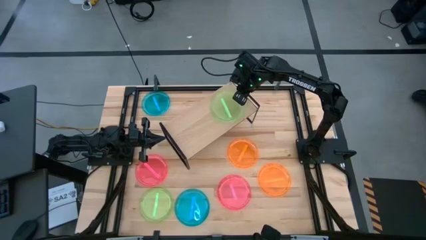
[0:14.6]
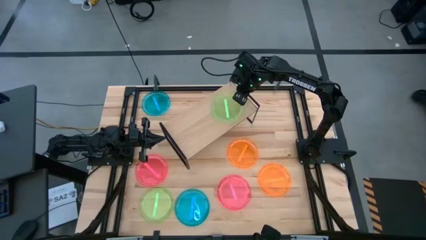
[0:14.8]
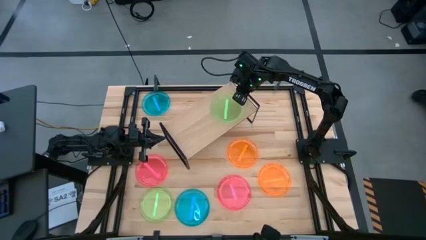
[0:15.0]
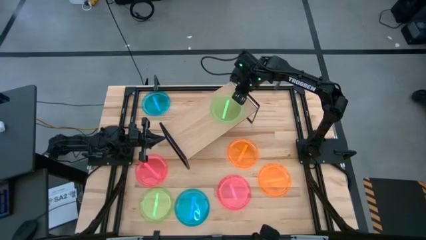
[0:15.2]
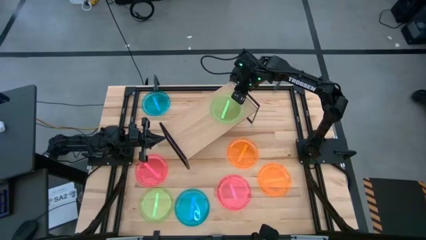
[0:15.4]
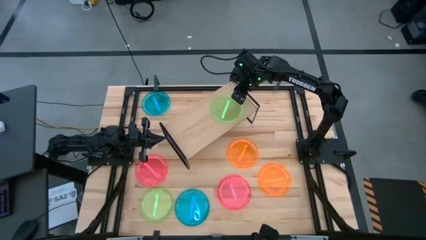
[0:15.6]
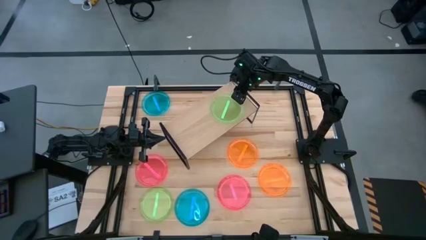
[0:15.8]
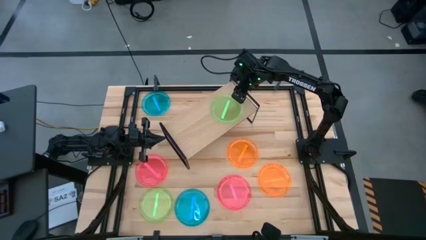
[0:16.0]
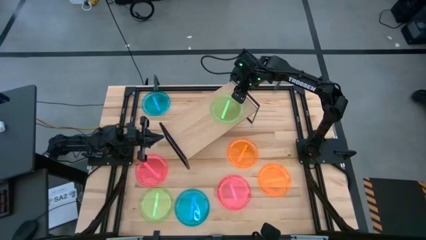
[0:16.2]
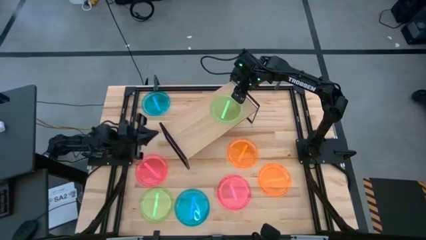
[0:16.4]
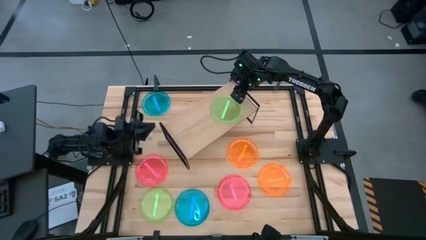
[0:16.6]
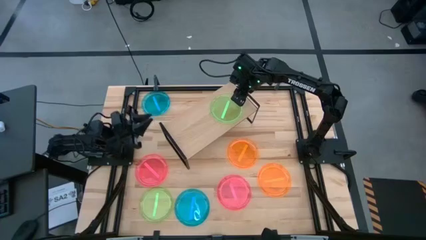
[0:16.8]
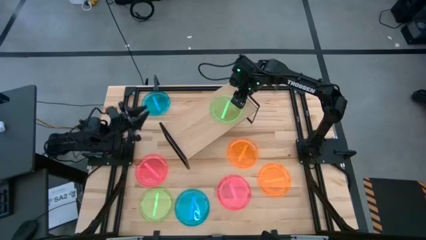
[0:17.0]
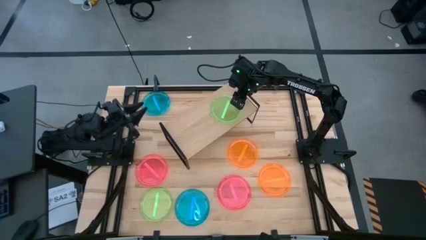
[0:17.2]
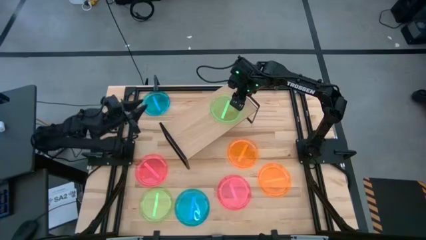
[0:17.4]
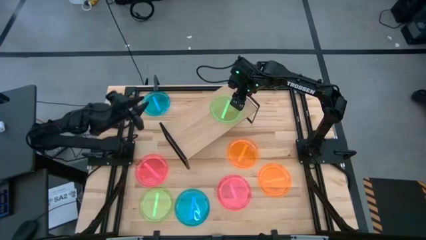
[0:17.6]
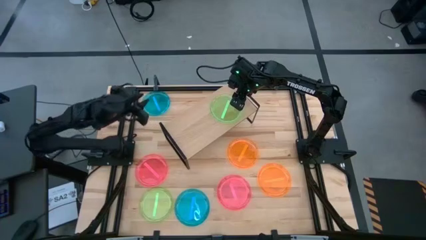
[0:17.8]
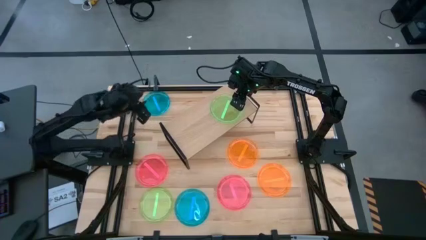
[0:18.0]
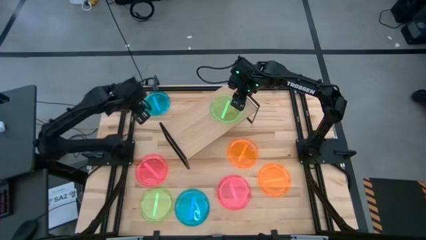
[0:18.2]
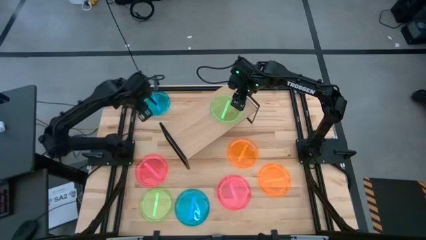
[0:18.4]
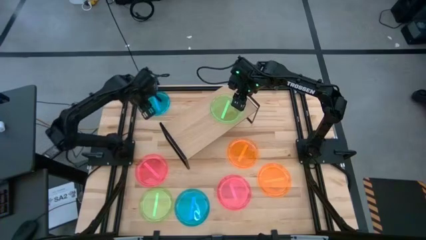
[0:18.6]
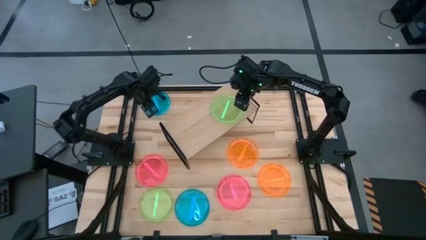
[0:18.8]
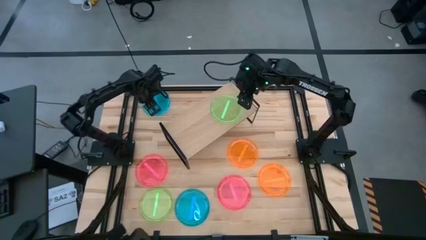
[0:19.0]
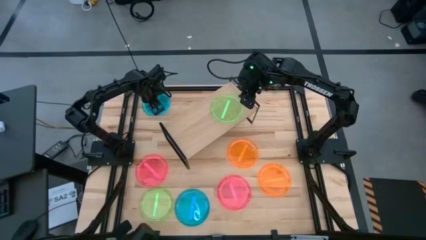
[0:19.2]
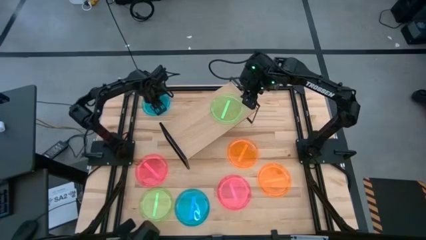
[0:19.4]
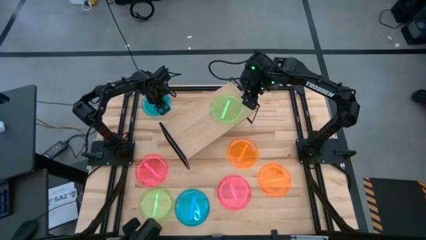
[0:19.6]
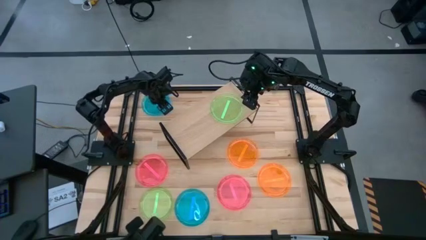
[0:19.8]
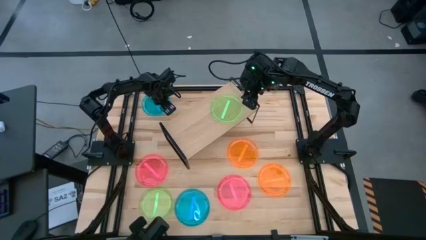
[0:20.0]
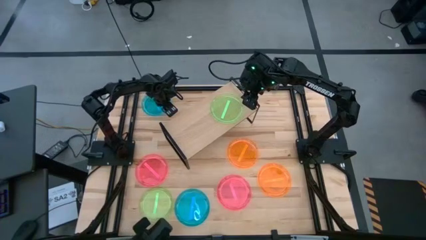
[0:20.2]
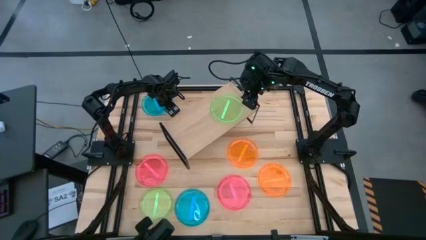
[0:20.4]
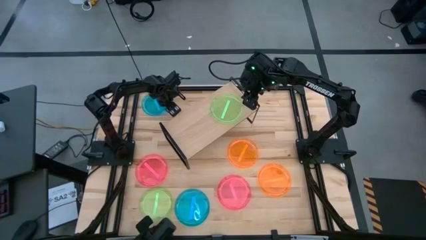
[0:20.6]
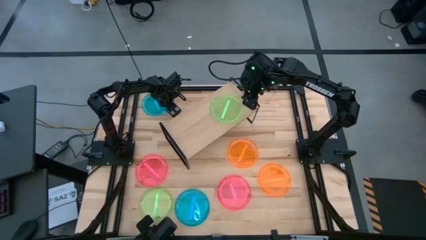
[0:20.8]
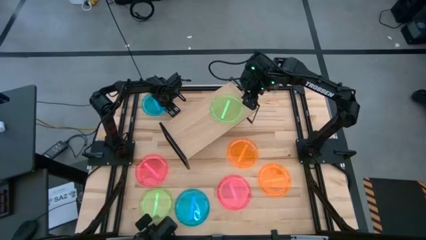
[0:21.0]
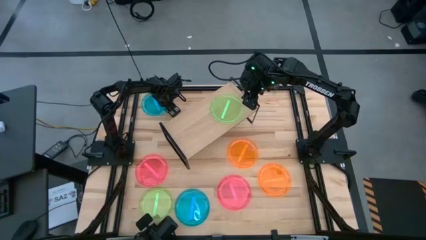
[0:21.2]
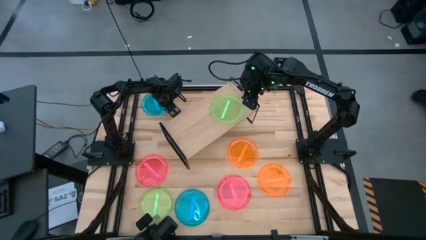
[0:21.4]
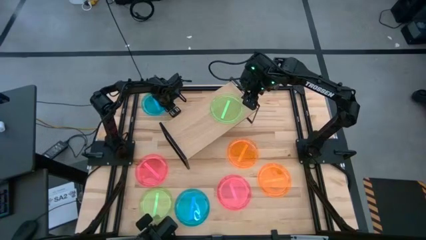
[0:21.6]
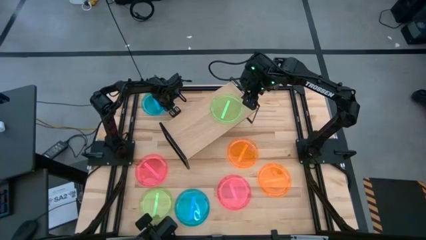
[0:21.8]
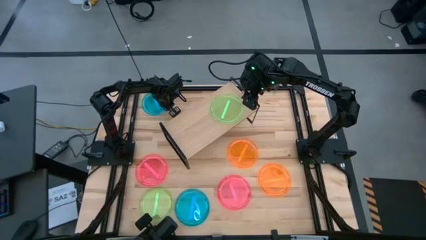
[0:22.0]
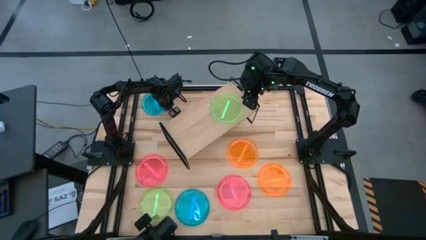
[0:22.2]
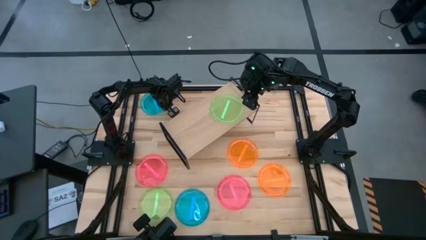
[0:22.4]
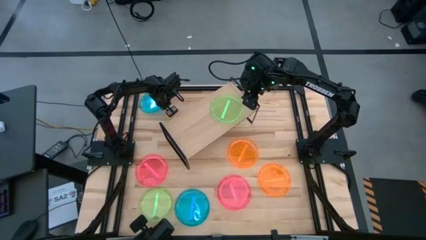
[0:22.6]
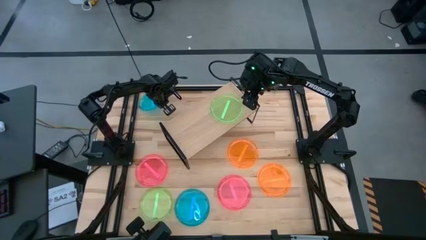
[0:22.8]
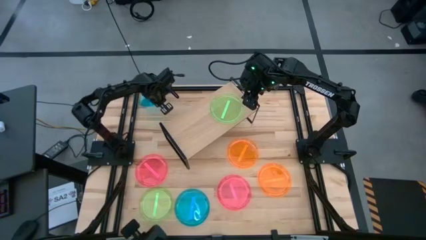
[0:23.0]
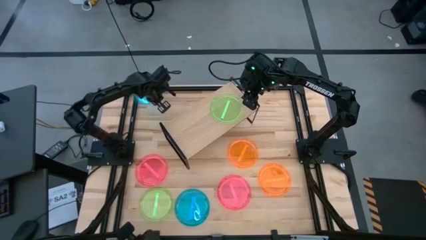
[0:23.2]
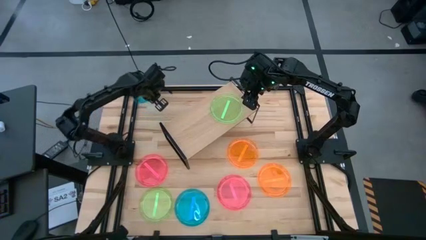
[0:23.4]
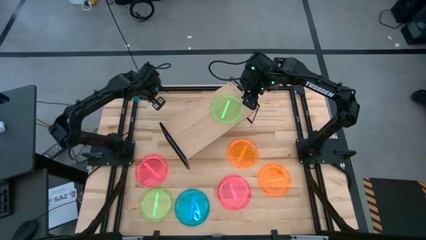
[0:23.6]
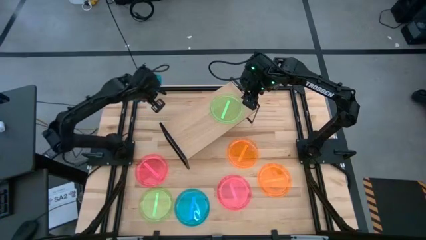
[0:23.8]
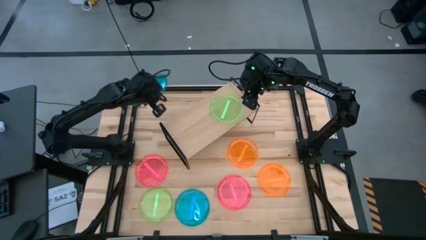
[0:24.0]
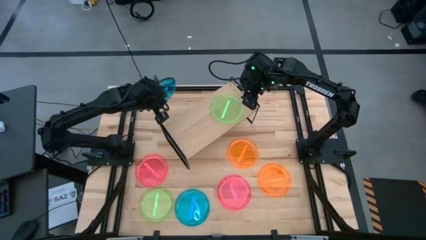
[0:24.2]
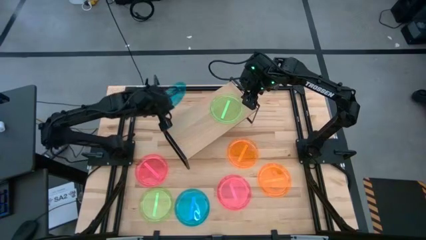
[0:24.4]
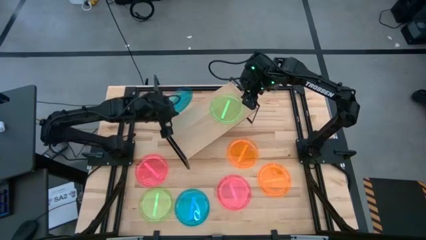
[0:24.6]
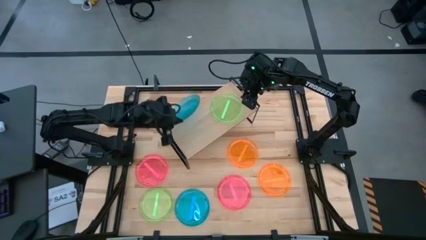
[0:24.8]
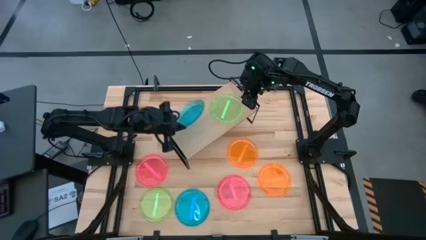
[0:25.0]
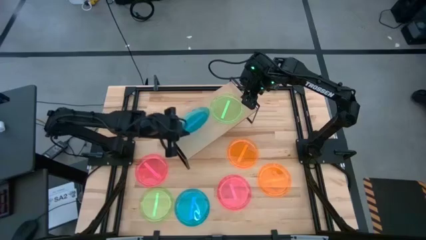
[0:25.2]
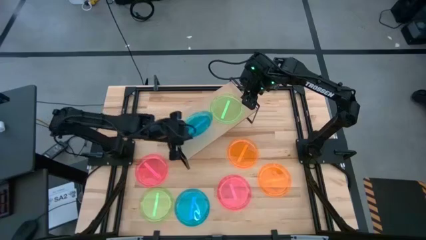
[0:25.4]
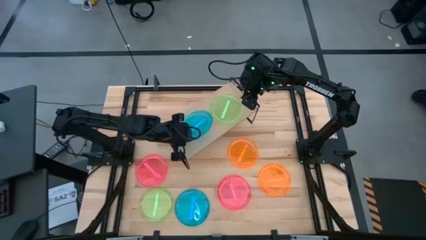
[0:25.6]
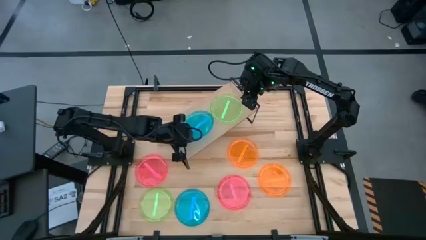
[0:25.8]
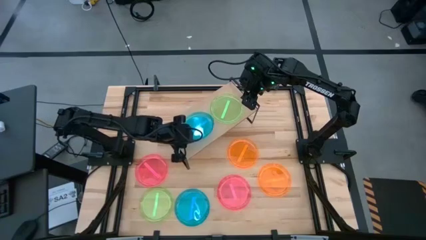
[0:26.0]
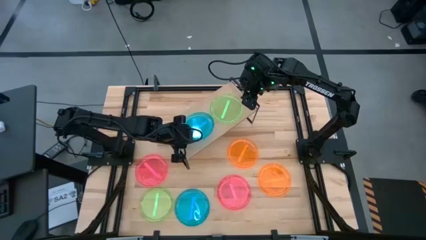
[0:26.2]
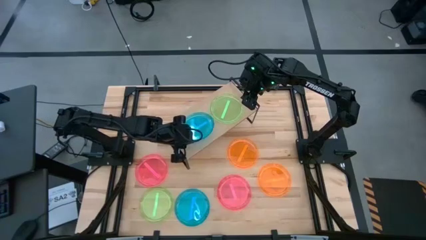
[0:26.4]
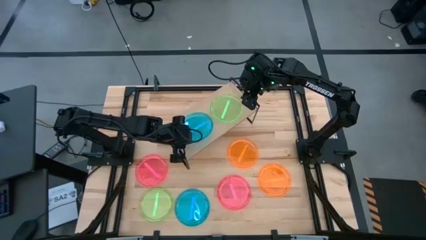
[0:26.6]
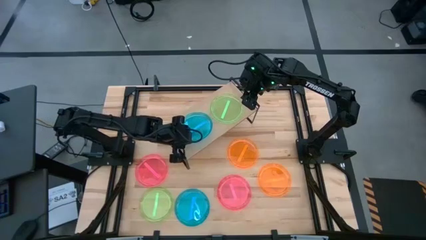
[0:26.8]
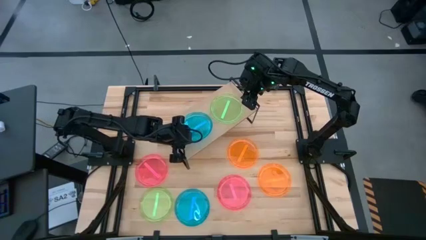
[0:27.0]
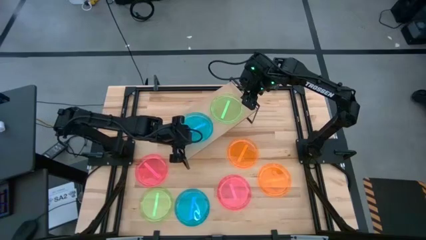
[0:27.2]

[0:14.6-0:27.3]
Task: Place and stack plates onto a shelf
Put the top left blue plate on the shelf
